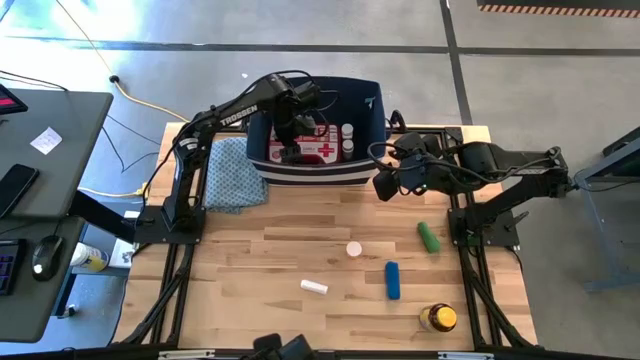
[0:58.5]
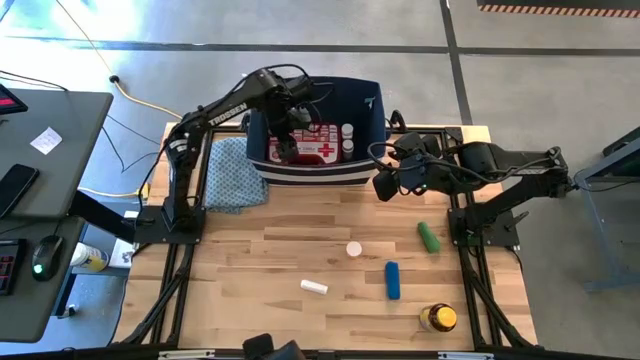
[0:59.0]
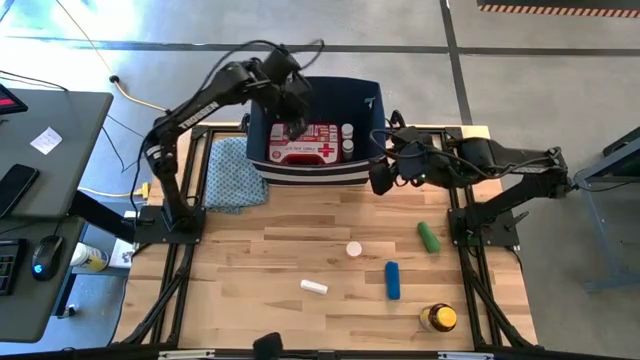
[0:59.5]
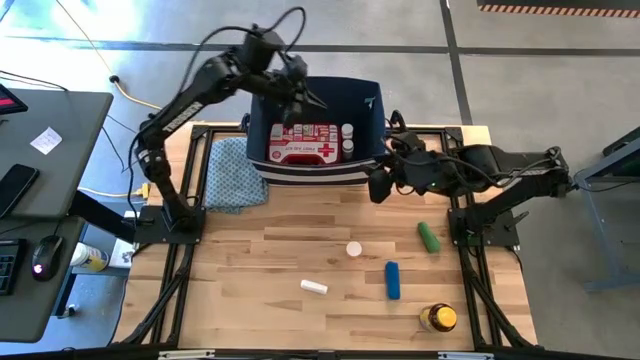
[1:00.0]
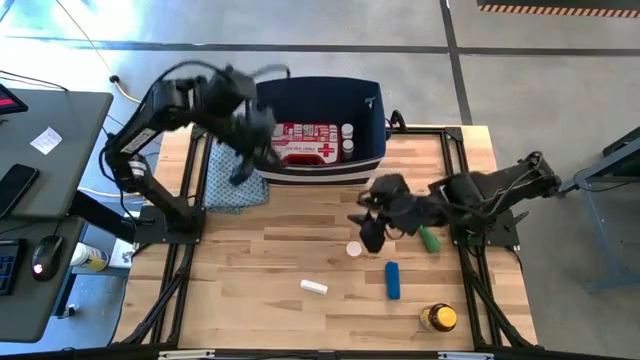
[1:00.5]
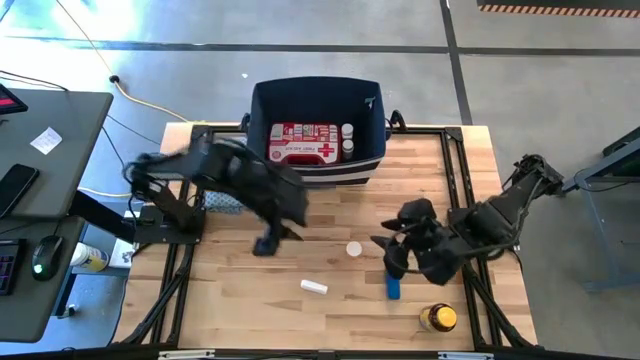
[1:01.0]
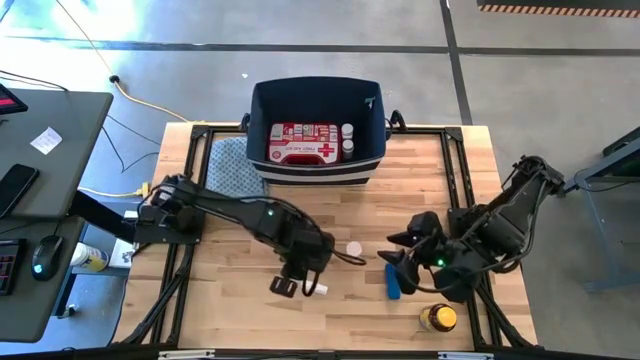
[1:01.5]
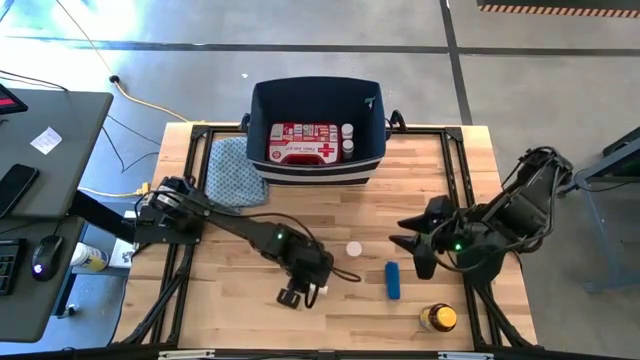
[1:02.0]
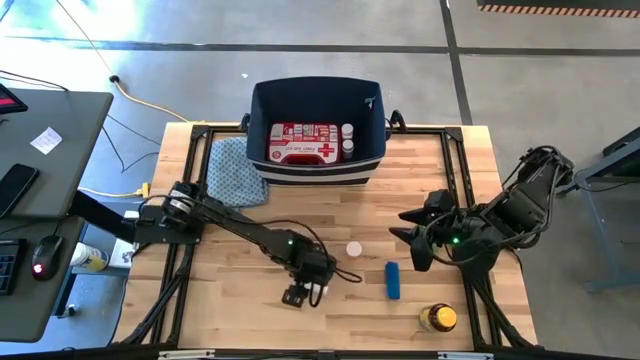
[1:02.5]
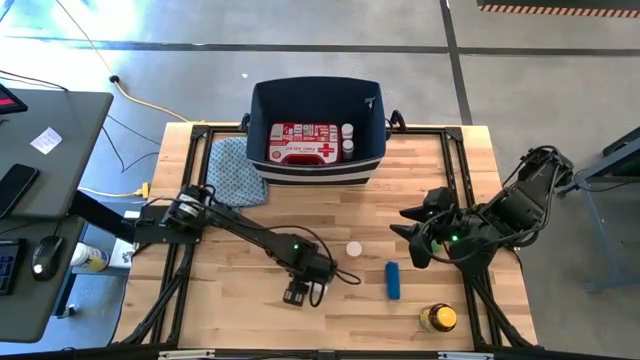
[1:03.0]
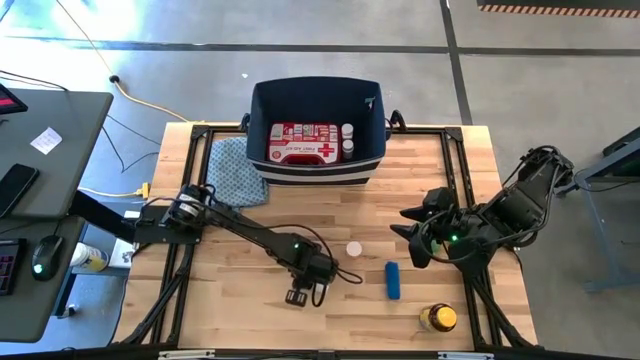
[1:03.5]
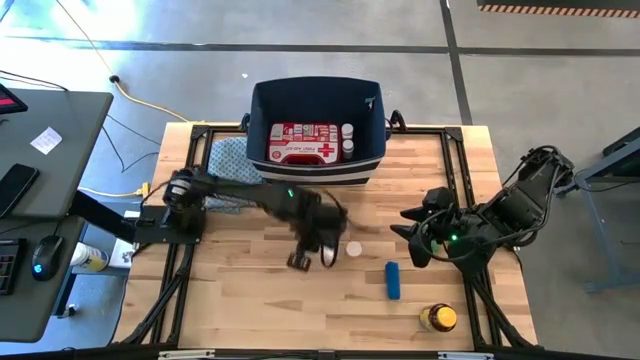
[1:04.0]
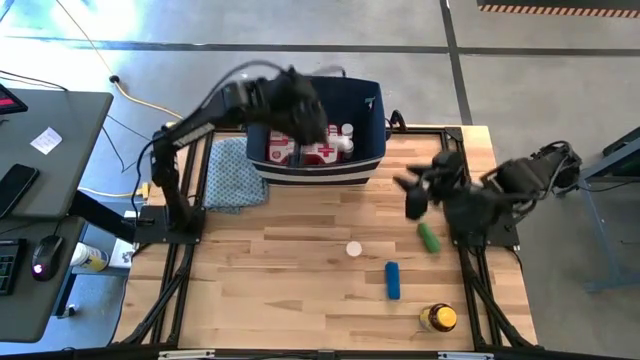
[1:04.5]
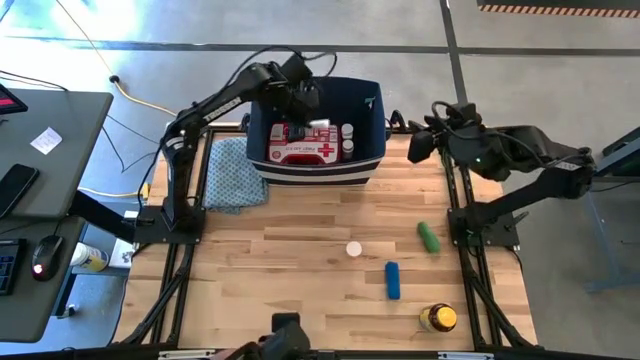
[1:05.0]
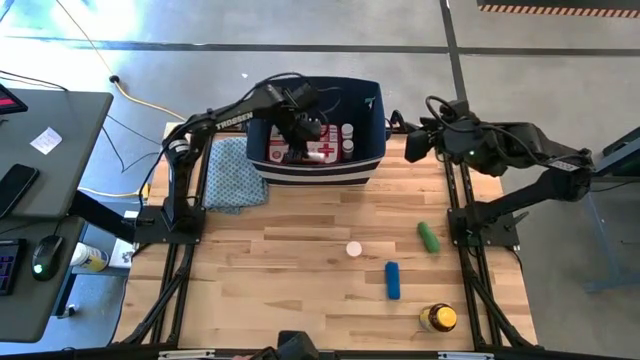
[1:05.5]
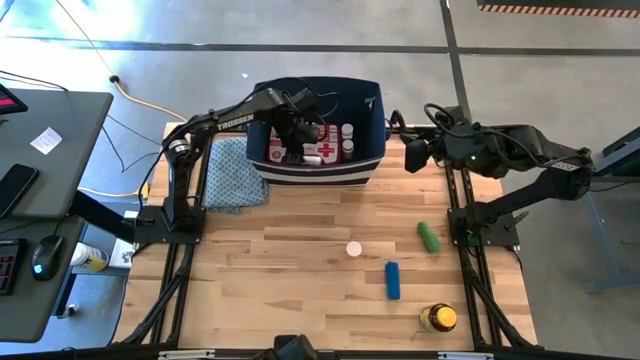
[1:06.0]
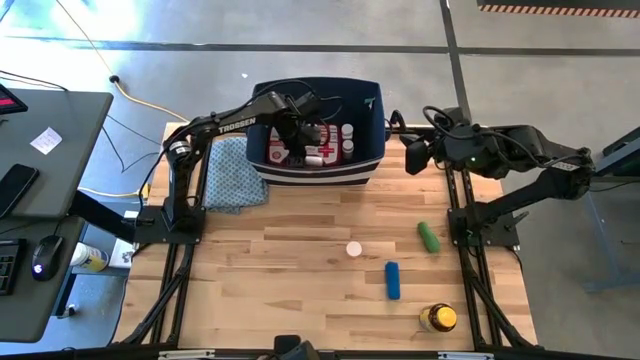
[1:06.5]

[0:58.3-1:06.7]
Task: Pick & place medical supplies in basket/bin
Put the white rolled gauze into the blue bin

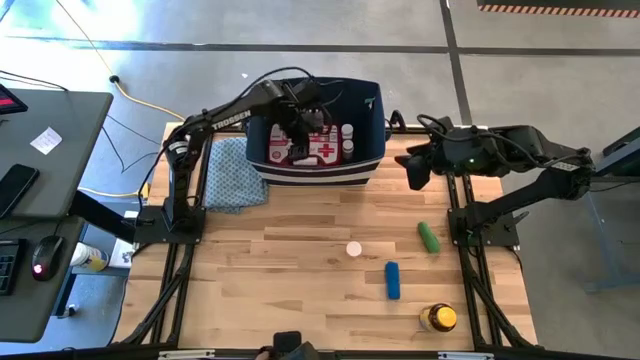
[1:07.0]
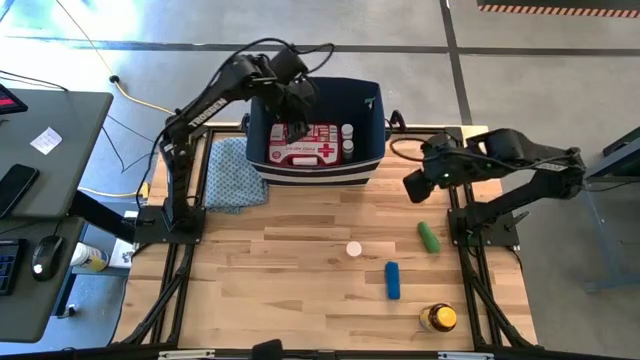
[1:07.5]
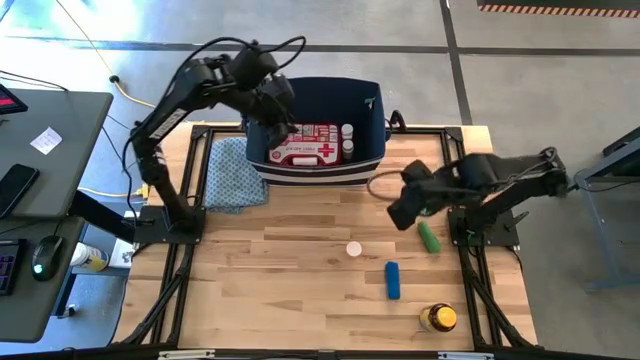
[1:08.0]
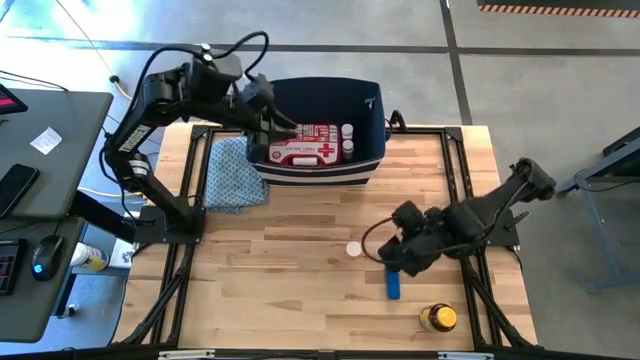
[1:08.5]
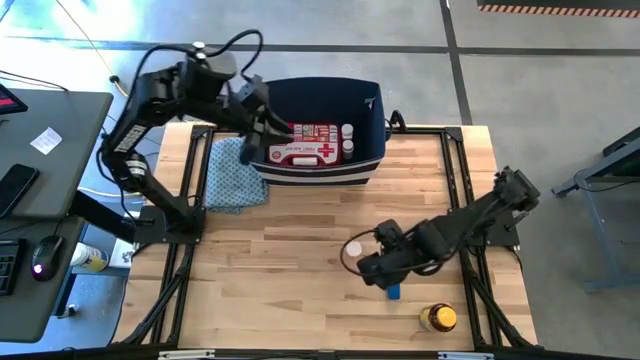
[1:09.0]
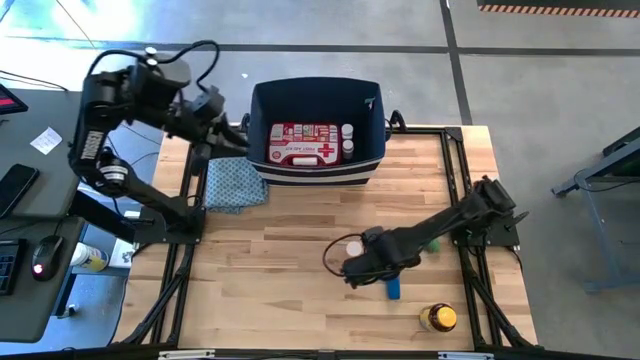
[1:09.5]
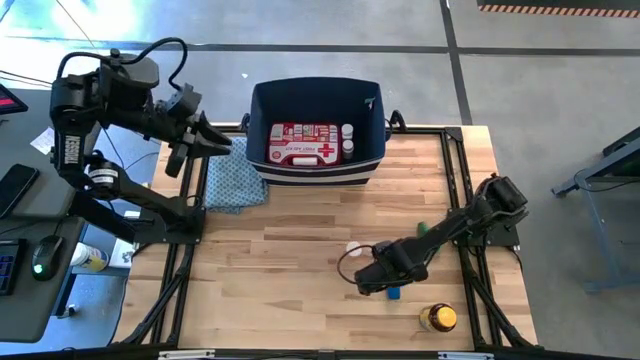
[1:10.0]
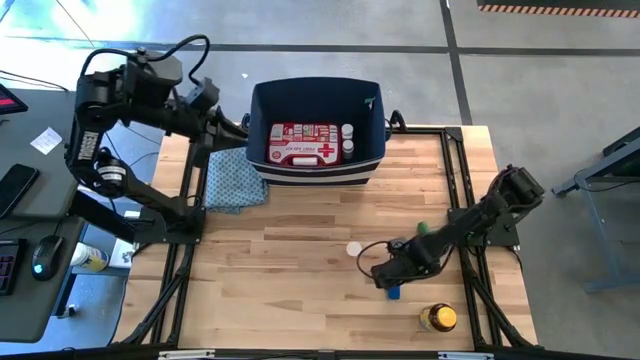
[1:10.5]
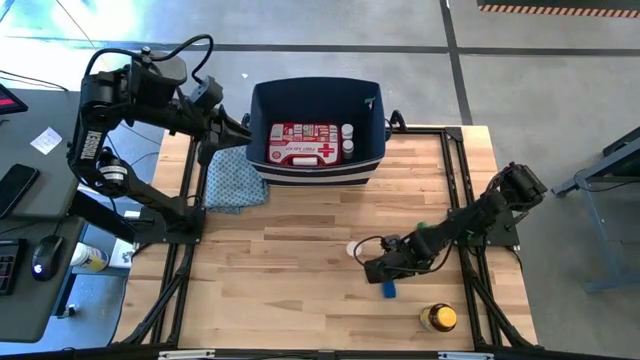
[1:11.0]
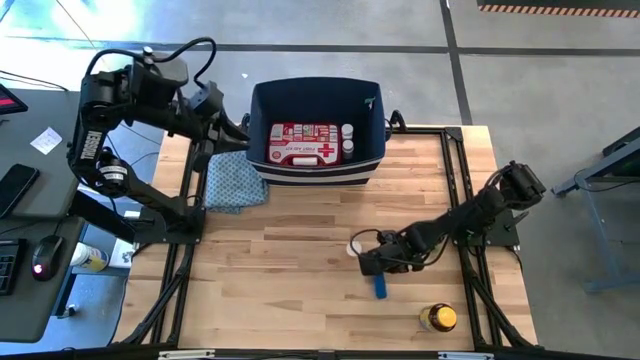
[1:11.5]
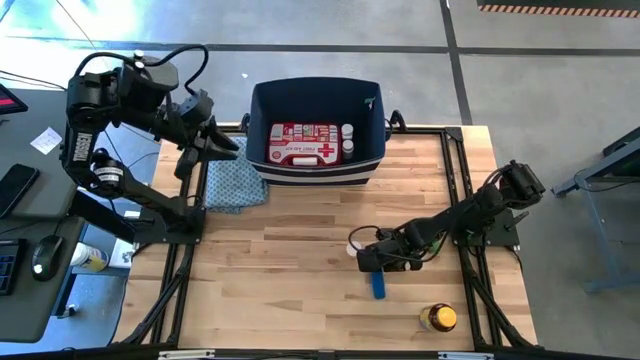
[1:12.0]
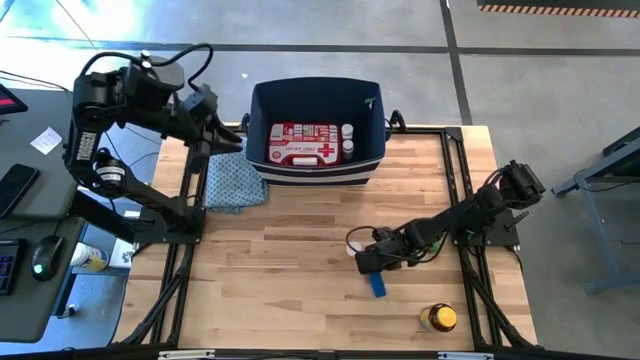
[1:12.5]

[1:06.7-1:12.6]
Put the blue bandage into the blue bin

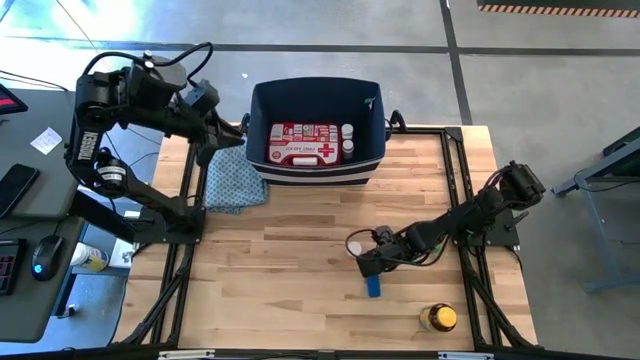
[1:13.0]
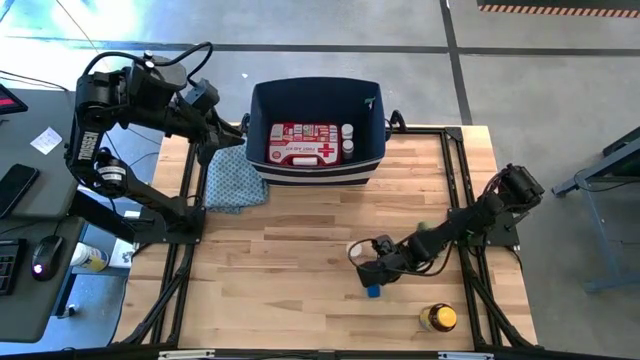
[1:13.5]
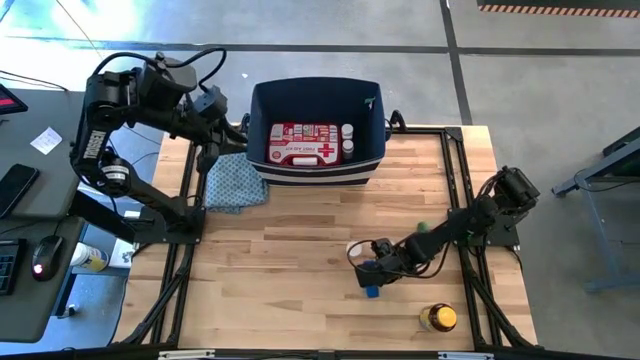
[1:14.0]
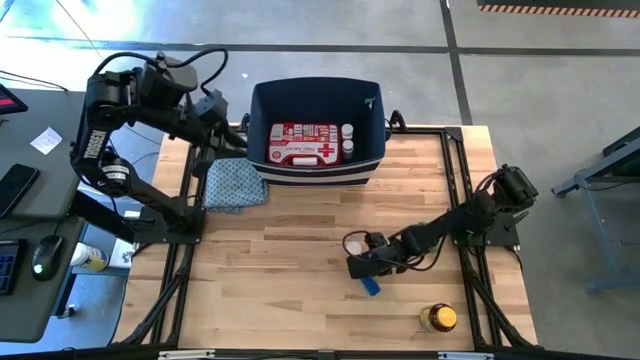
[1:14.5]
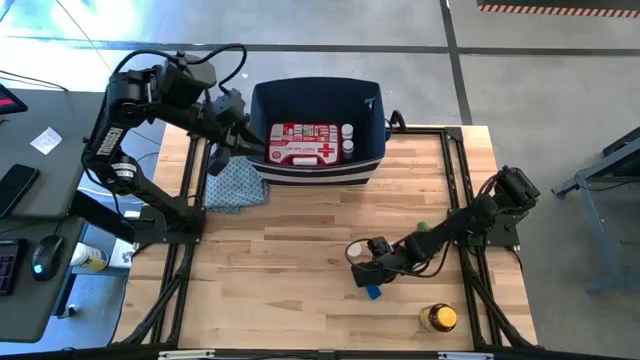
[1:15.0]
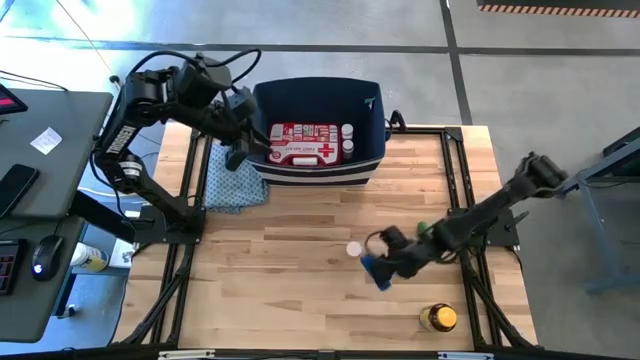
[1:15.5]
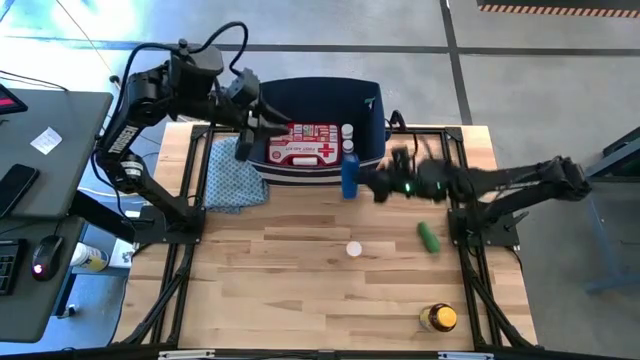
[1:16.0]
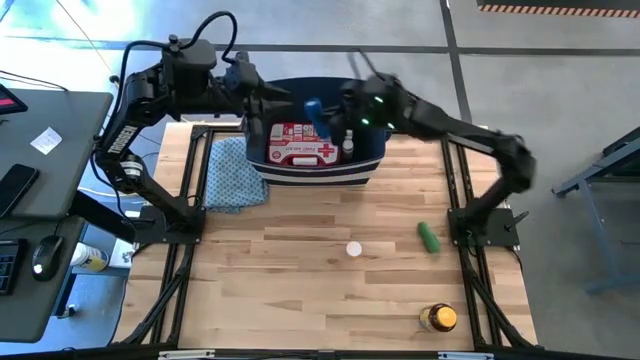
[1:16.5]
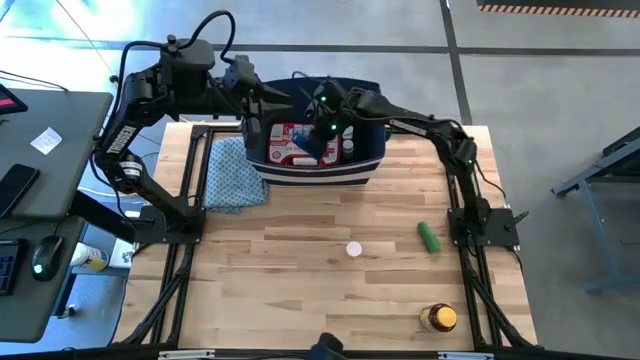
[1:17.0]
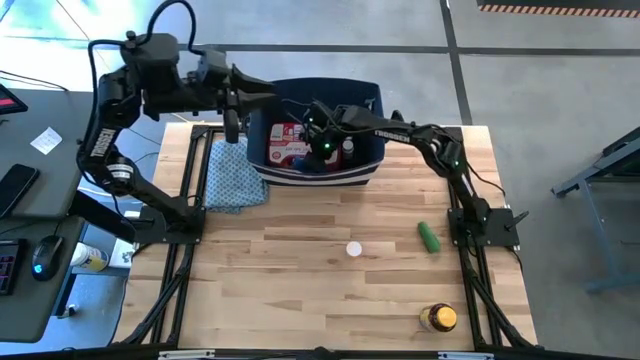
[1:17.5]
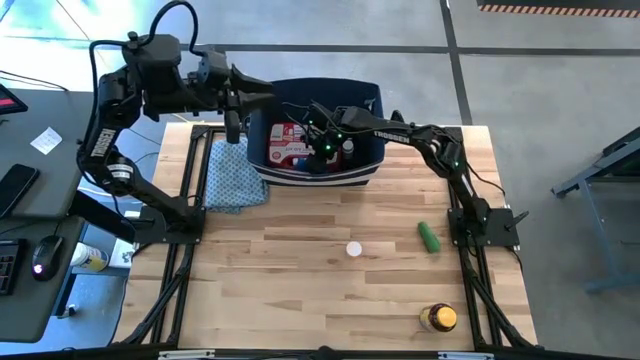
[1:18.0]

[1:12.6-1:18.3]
Put the blue bandage into the blue bin

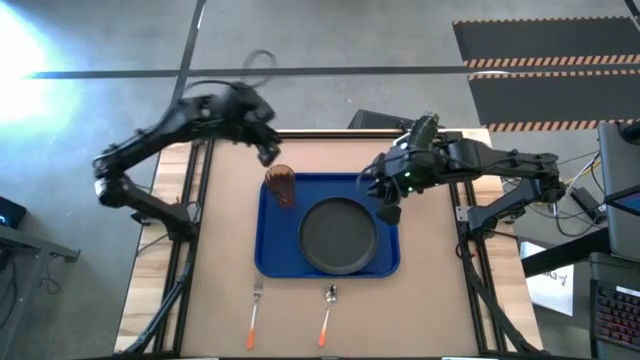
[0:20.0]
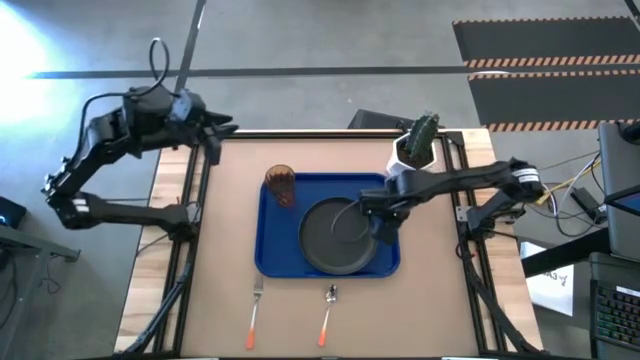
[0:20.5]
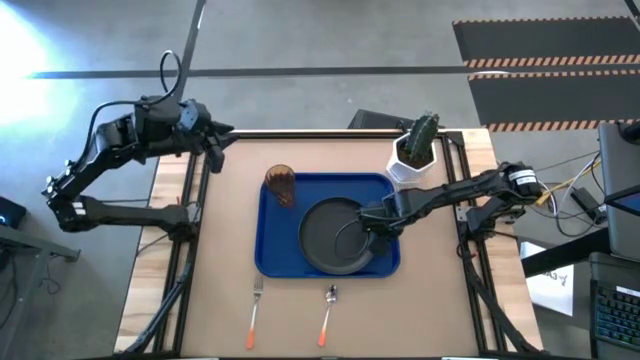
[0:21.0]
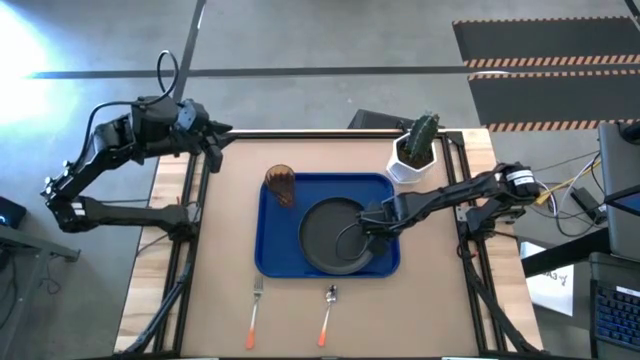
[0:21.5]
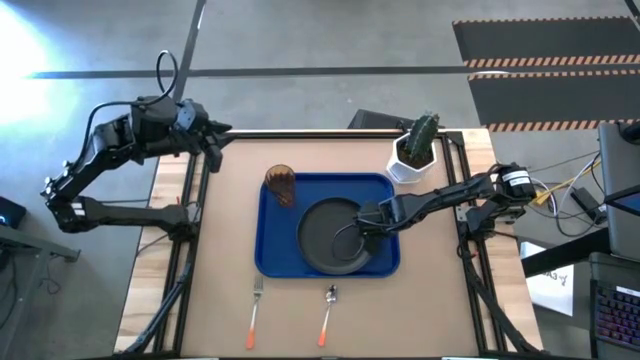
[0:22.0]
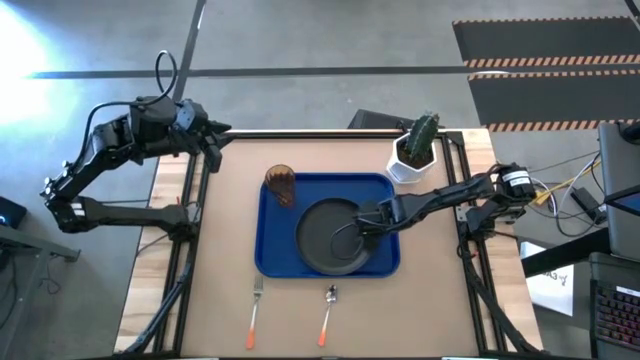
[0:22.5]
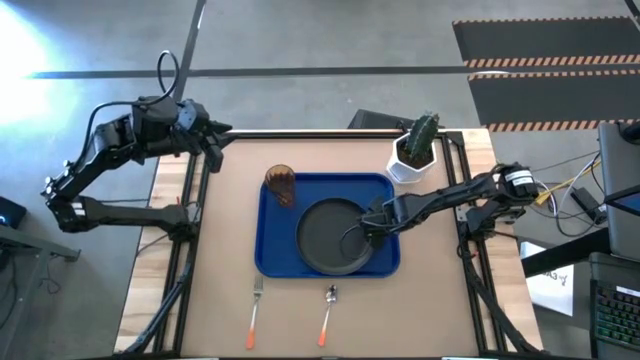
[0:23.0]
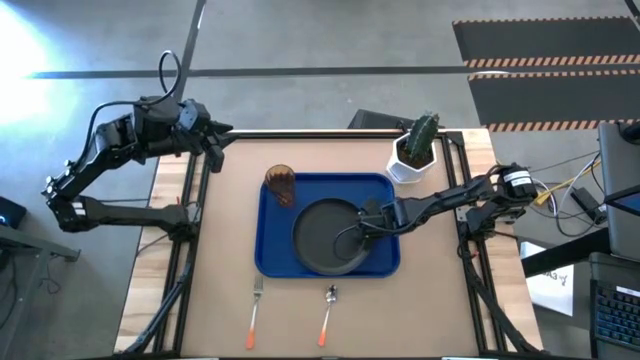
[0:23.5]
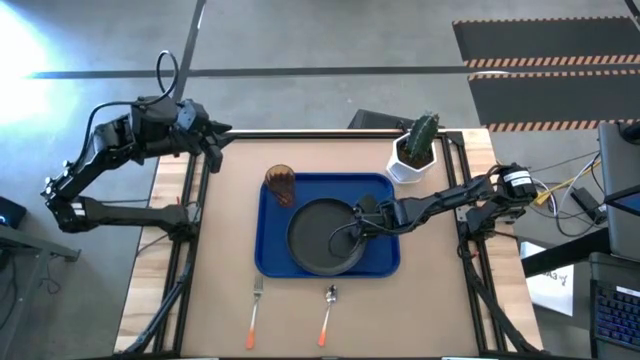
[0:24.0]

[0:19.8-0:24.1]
Task: Pick and place plate/cup/fork/spoon on tray
Adjust the black plate on the blue tray
